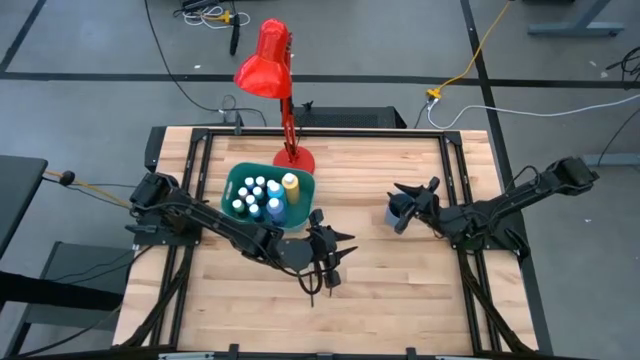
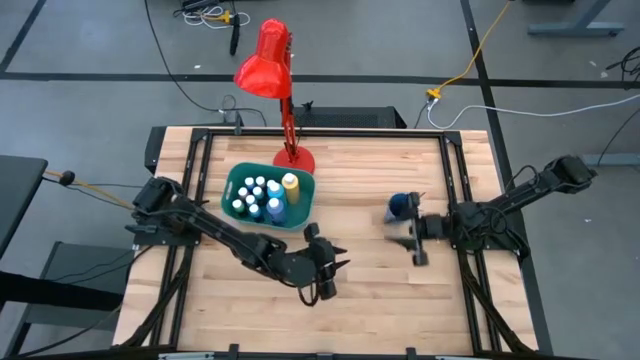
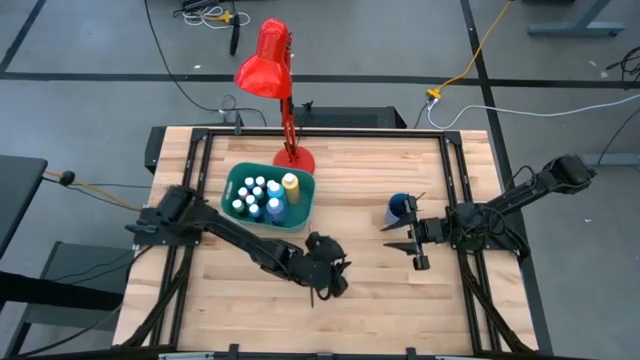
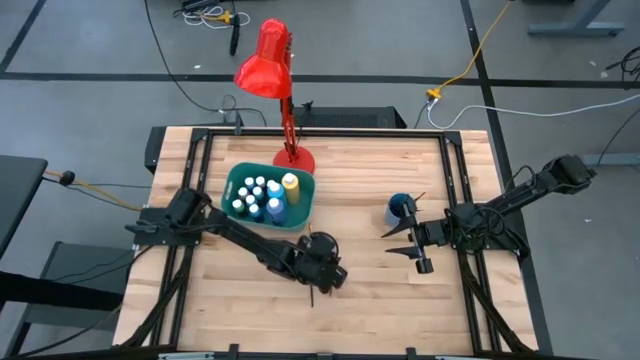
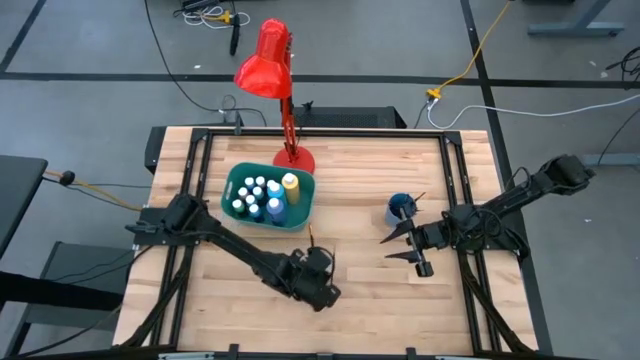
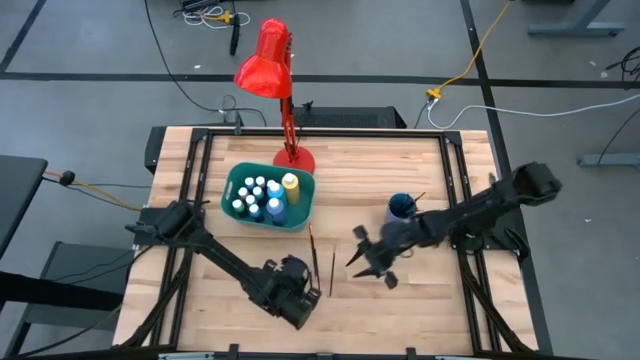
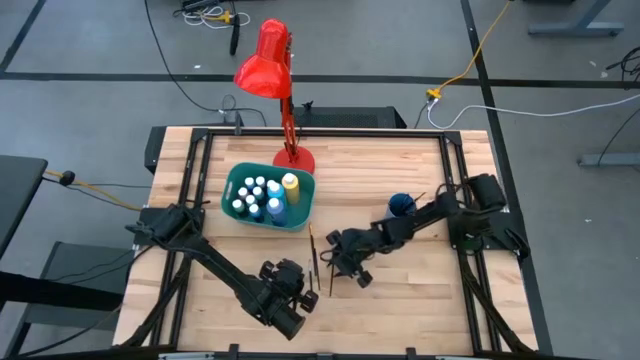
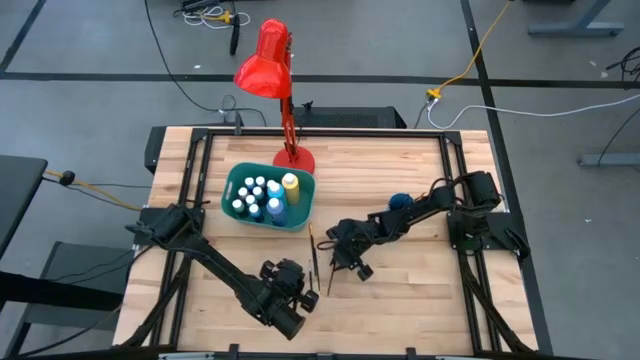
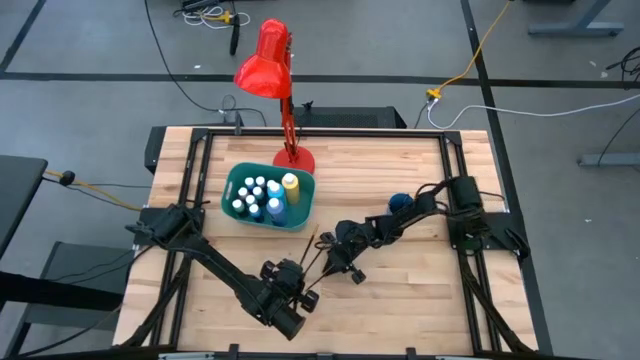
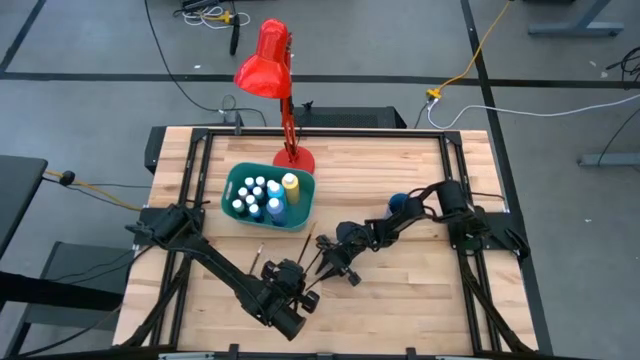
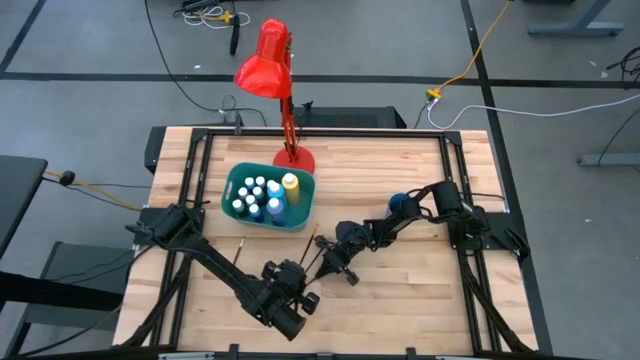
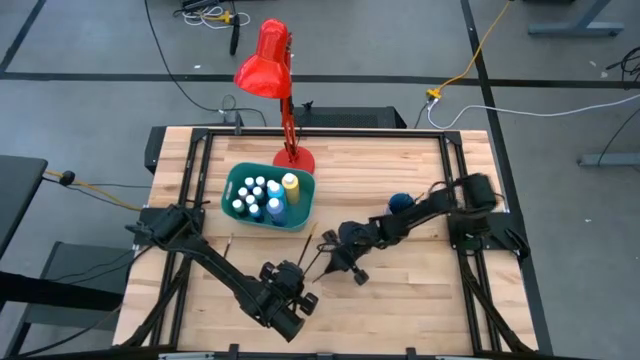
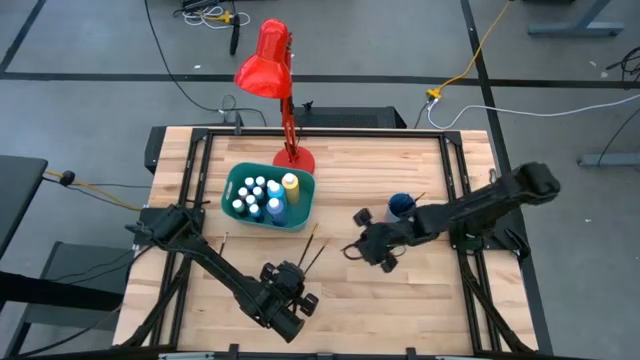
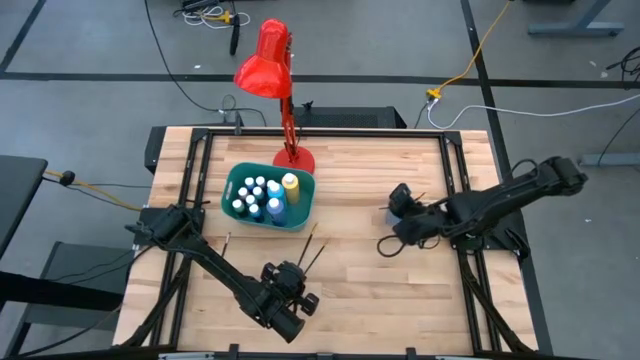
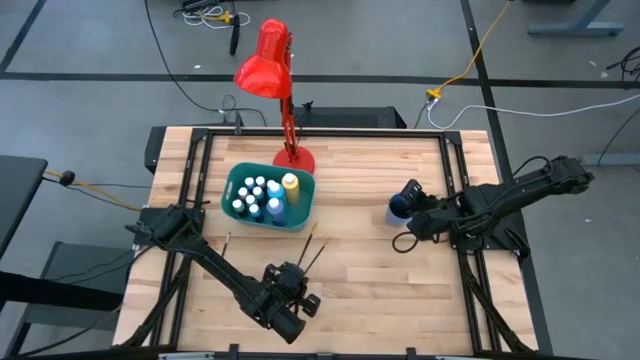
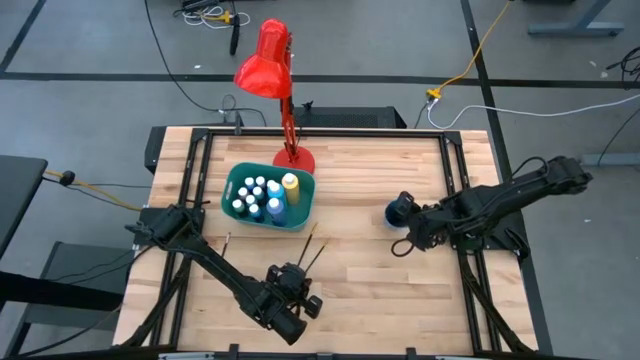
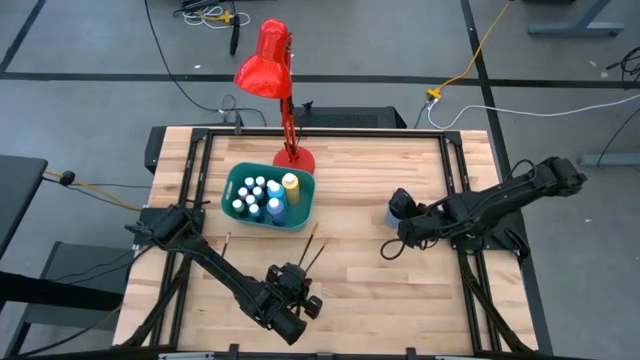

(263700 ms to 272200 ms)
Task: Pick & Place Paint Supplies
Put the black gold paint brush into the blue cup

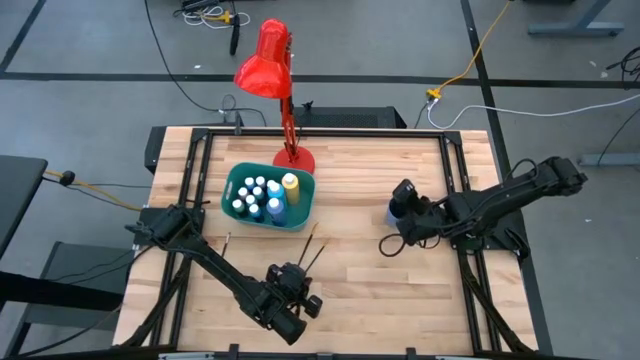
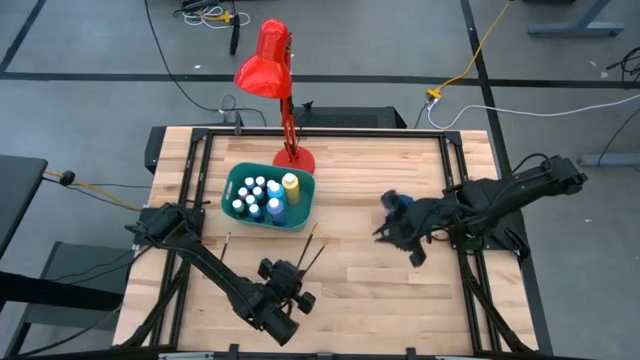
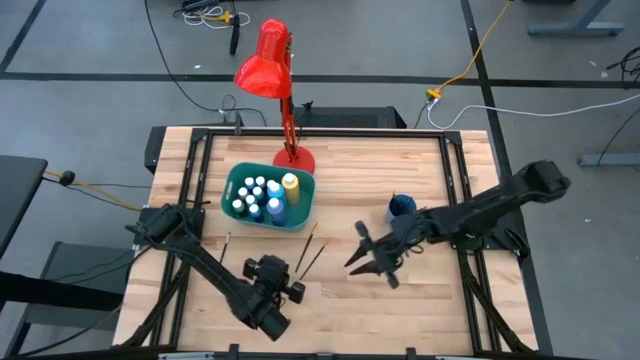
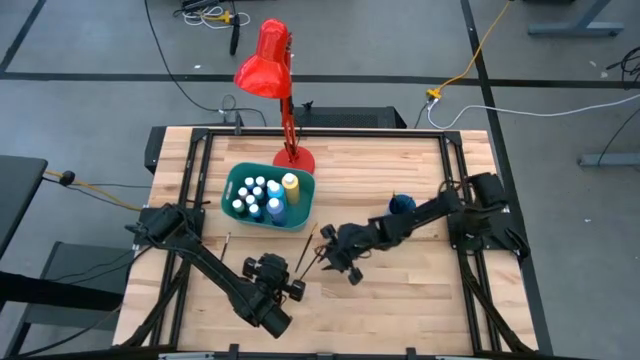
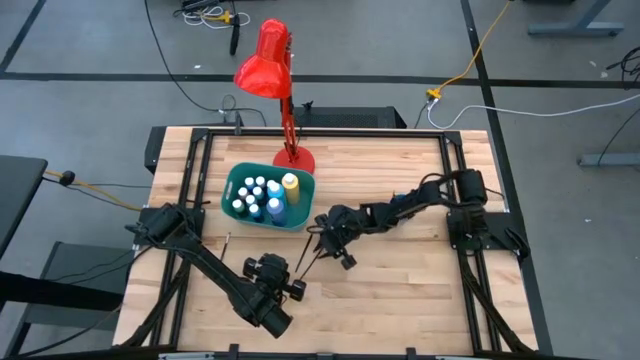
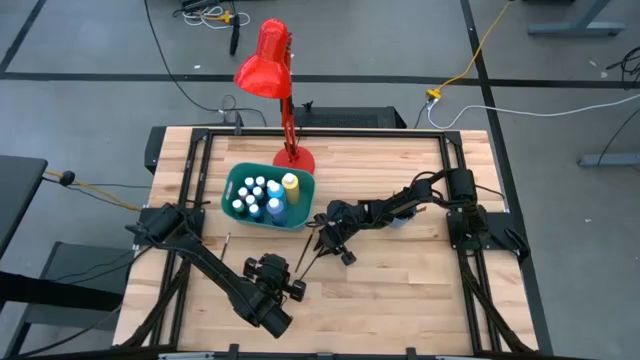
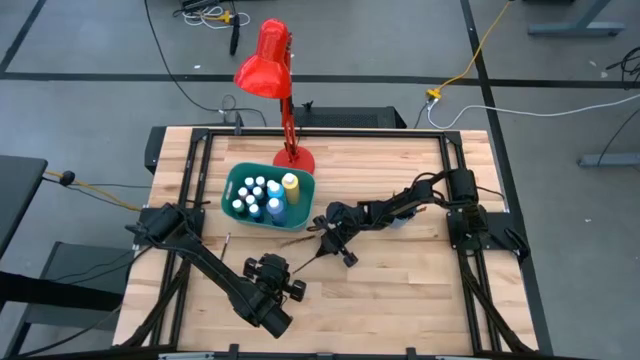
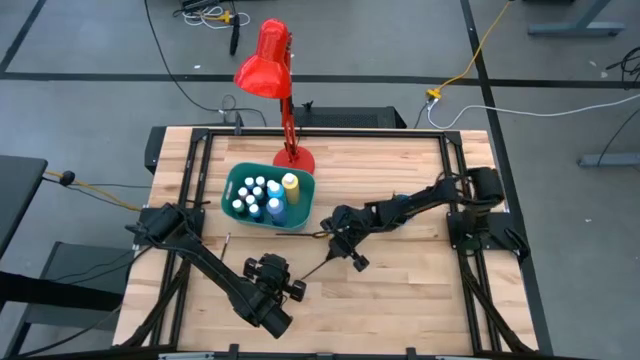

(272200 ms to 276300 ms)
Put the black gold paint brush into the blue cup

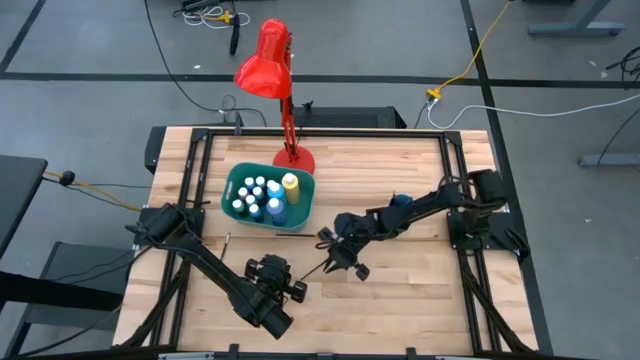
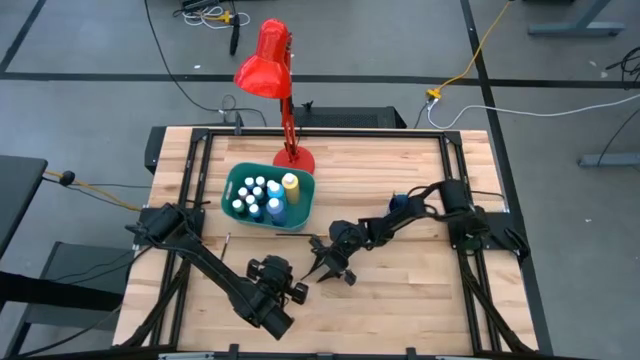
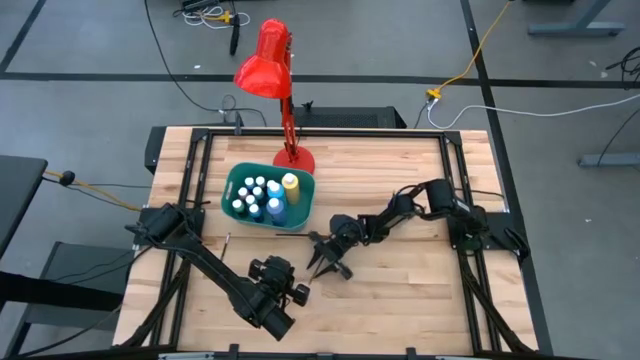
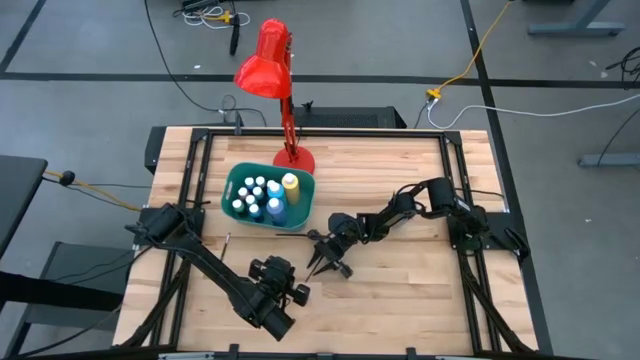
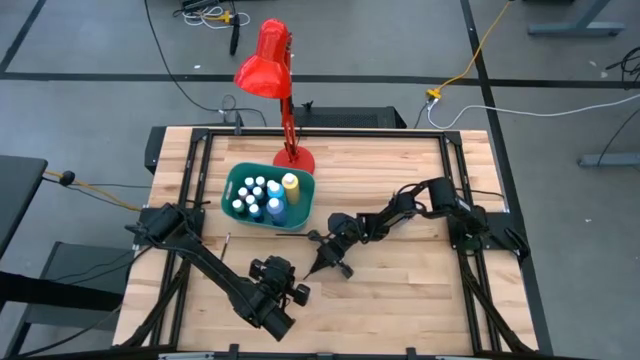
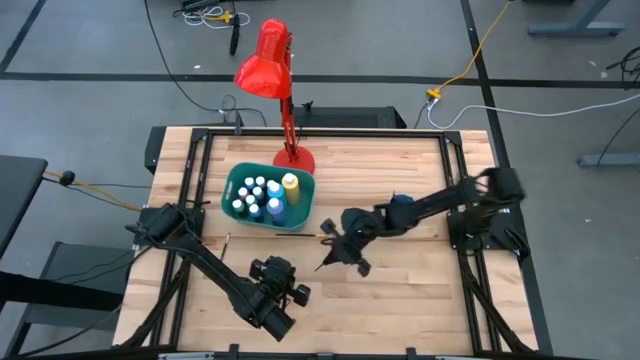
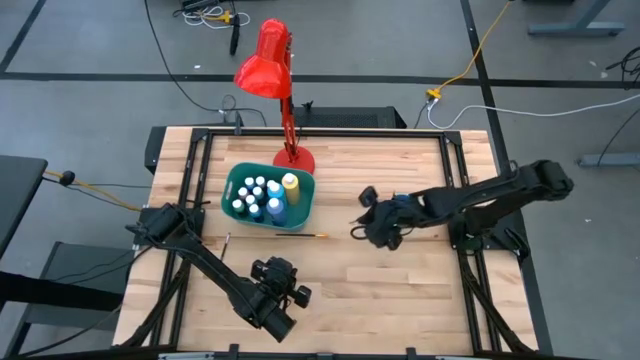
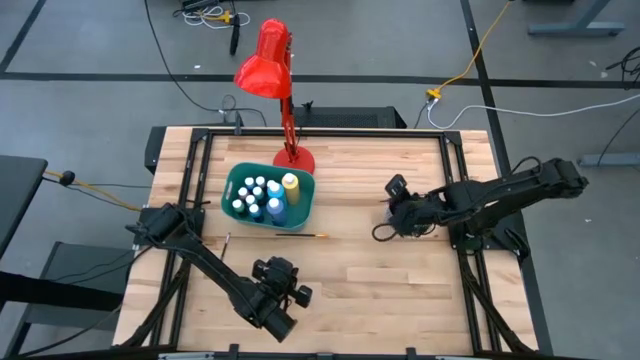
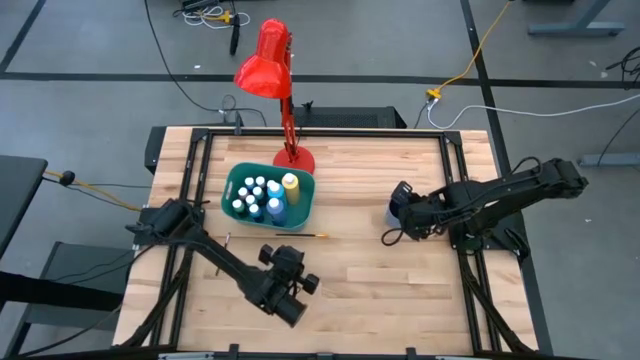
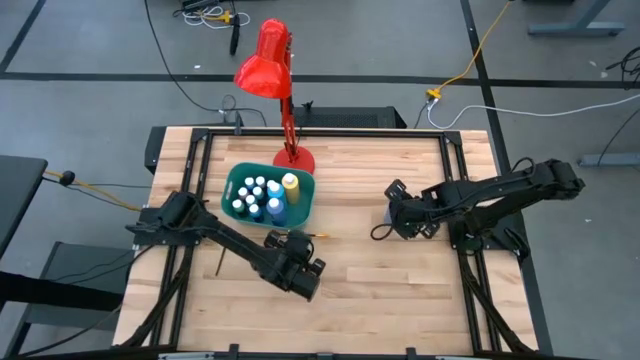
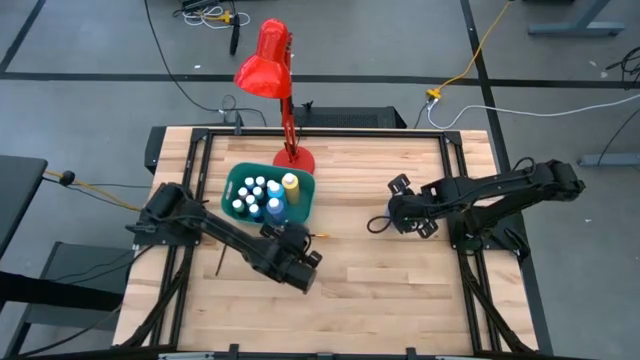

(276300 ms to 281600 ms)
Put the black gold paint brush into the blue cup

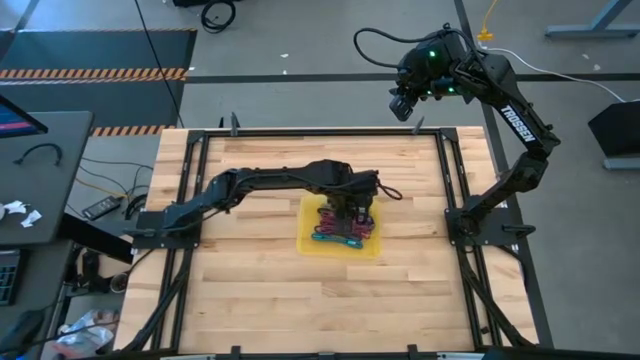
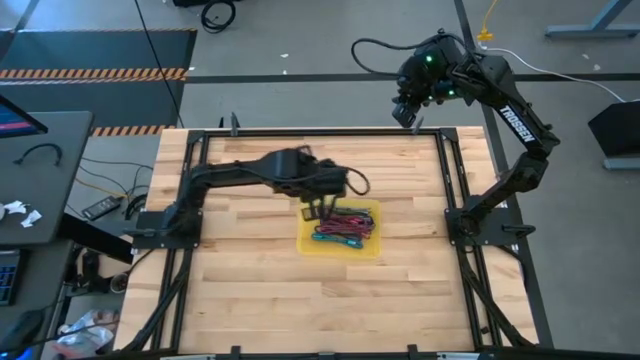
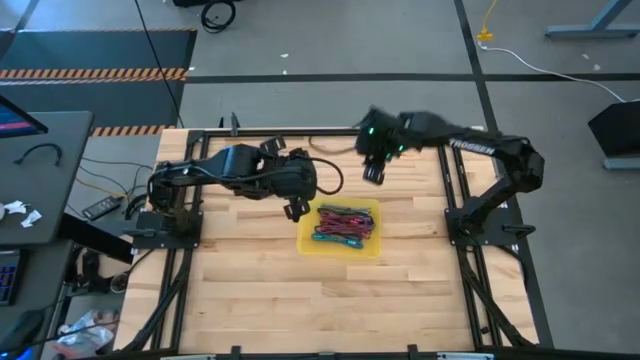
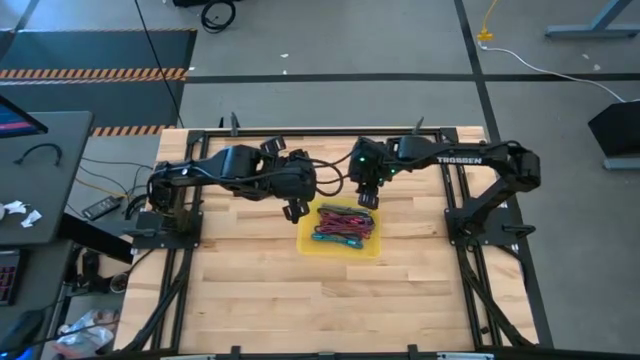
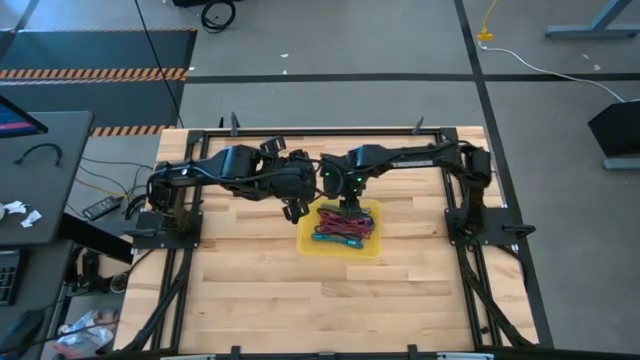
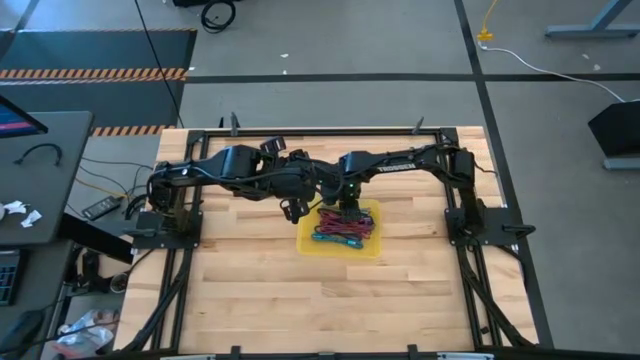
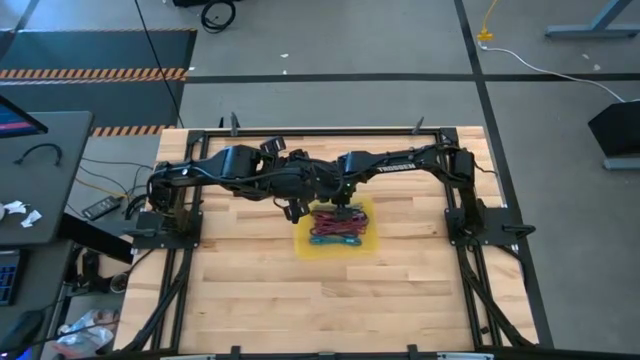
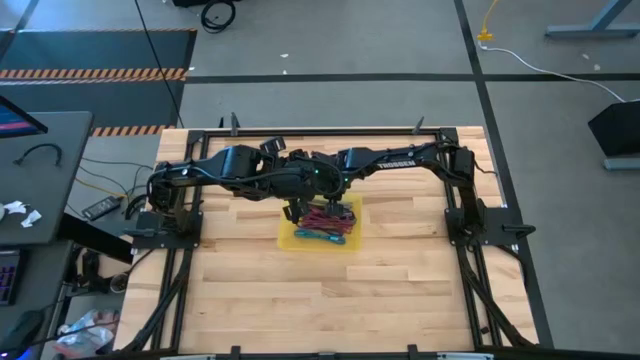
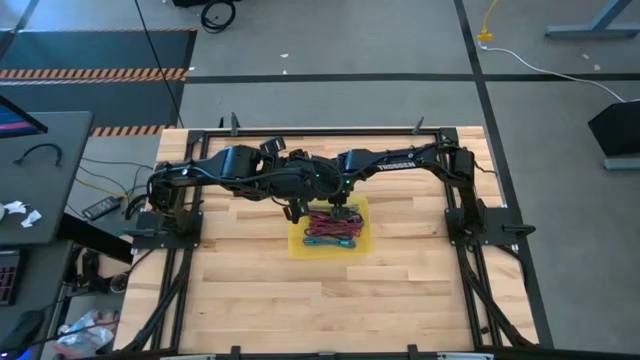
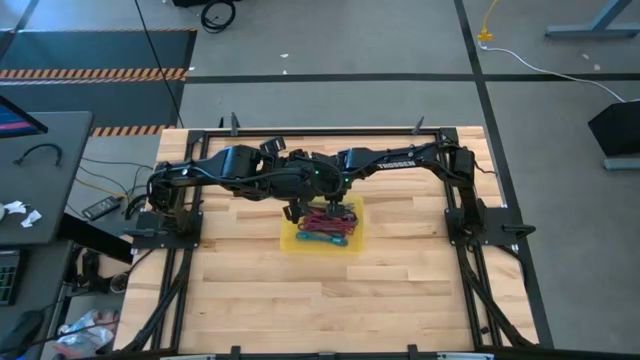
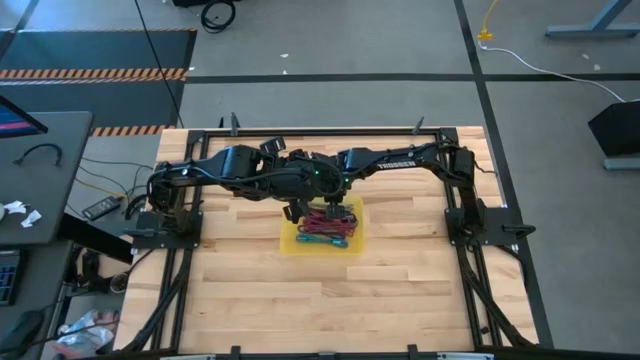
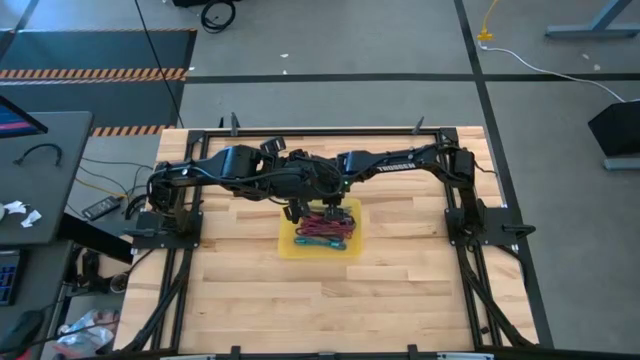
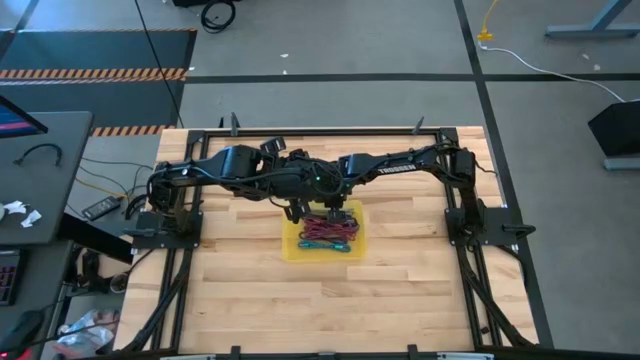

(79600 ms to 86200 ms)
Task: Pick and place USB-C Cables
Adjust the yellow bin
